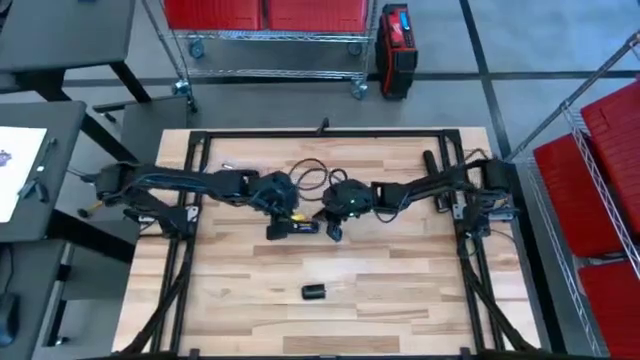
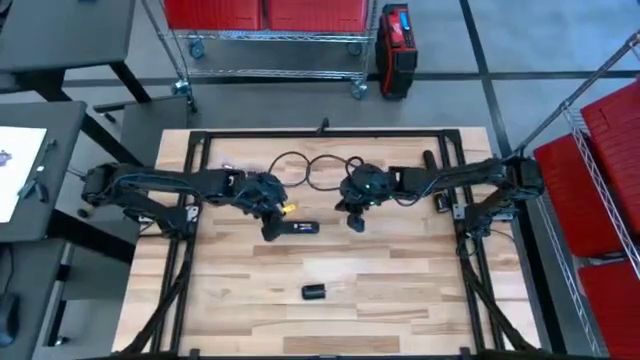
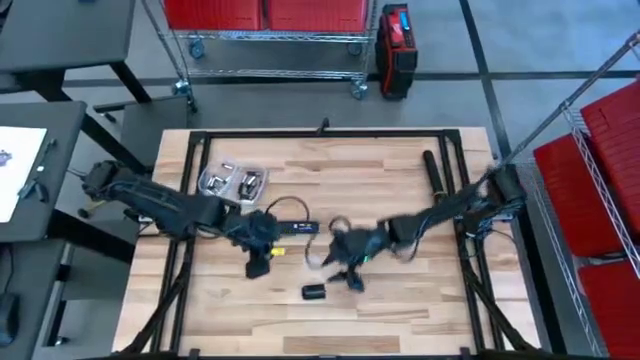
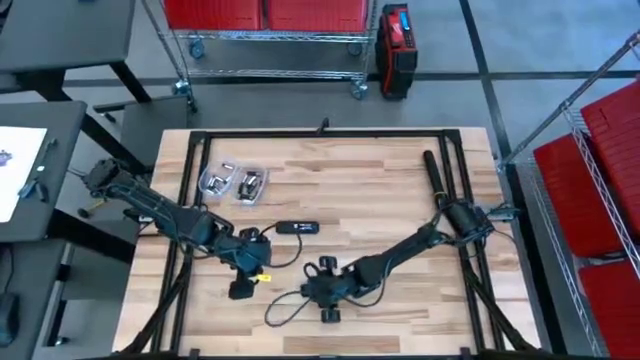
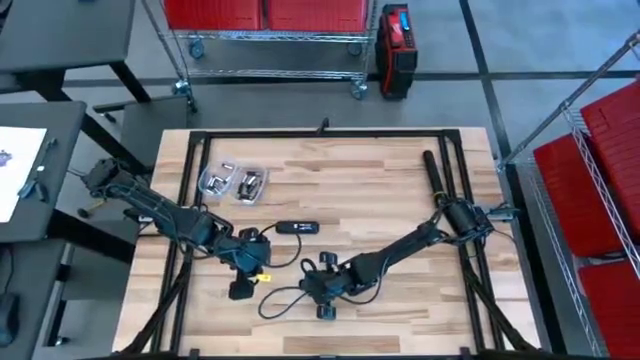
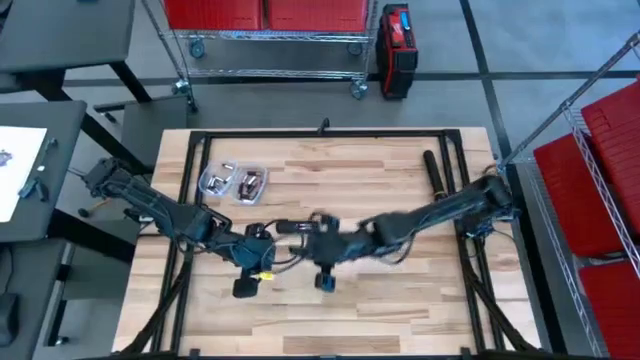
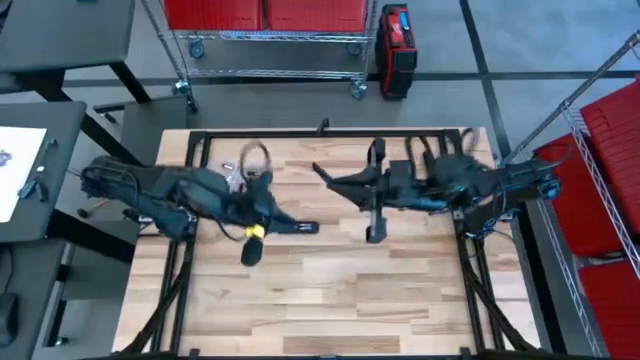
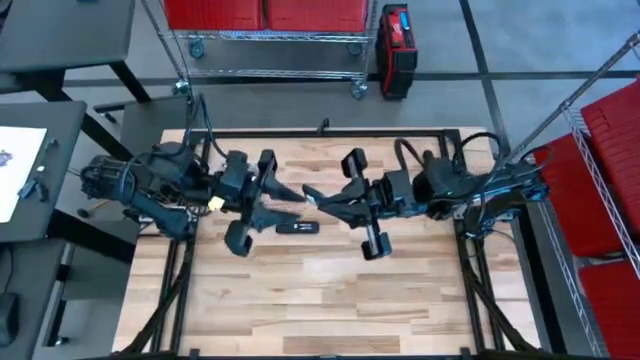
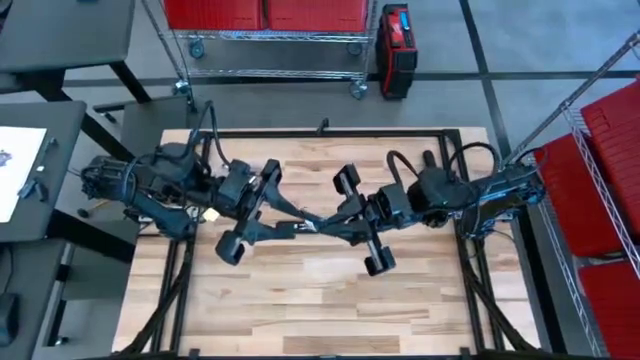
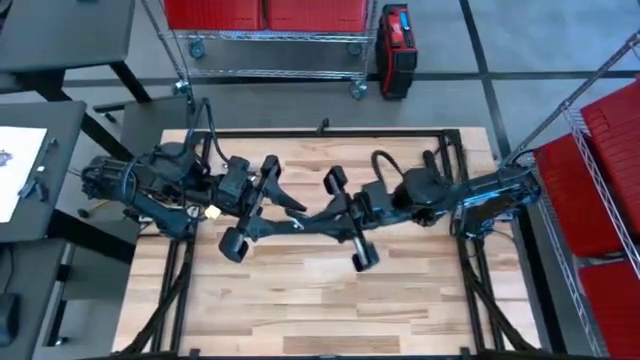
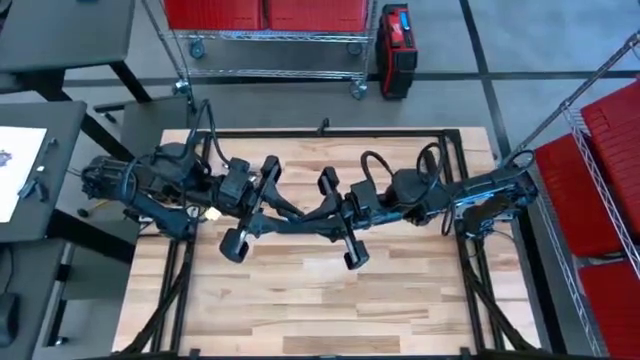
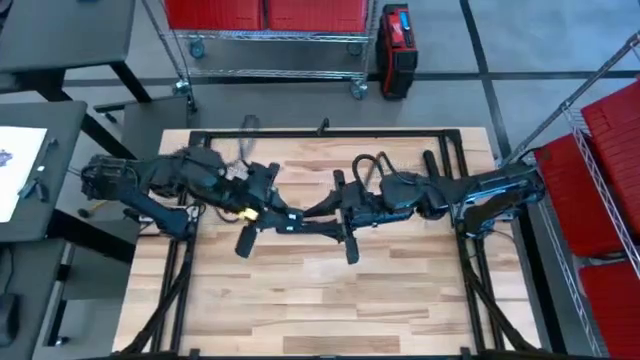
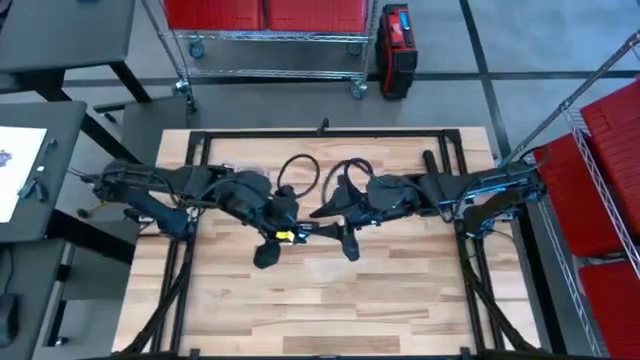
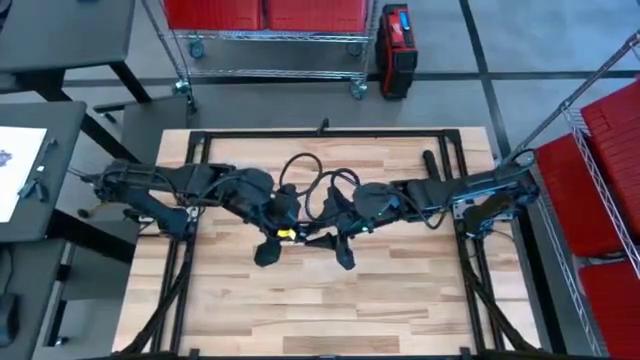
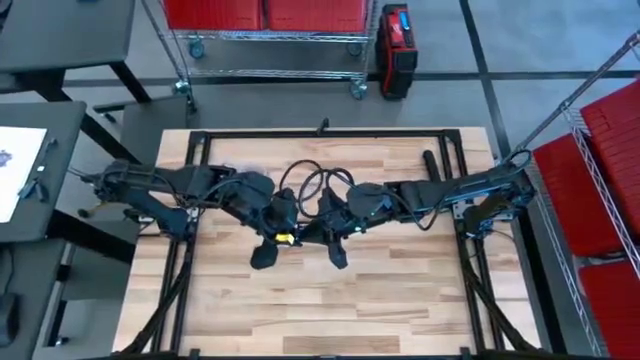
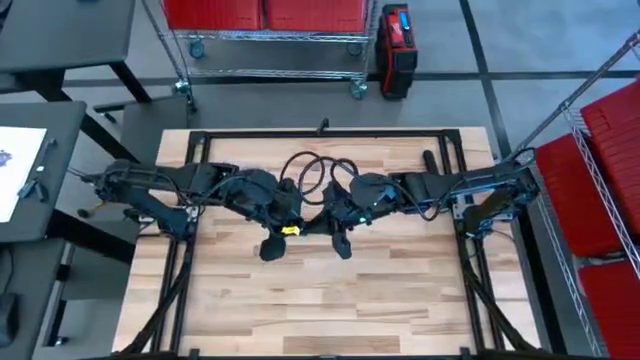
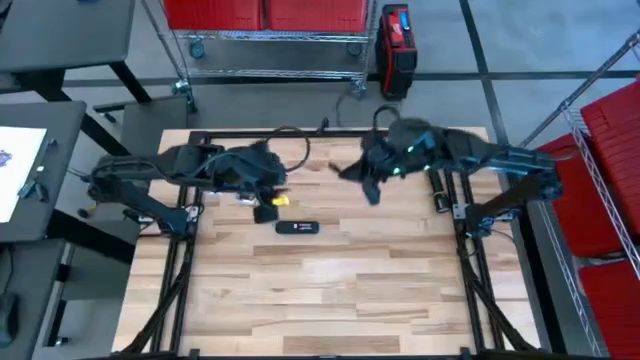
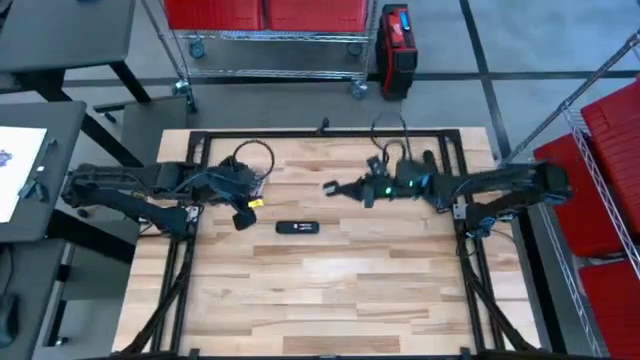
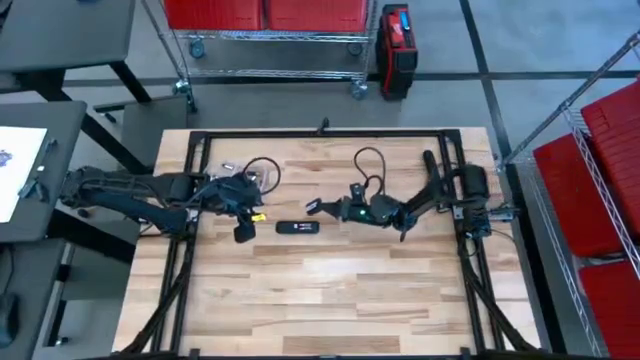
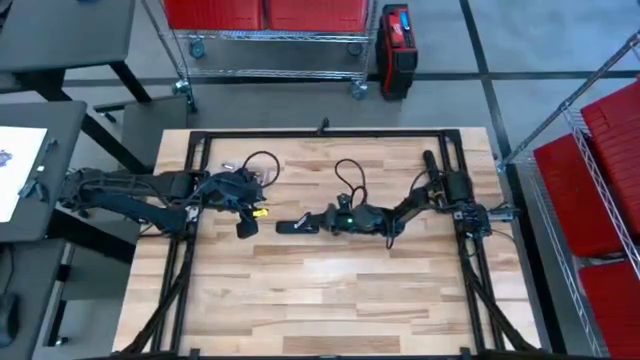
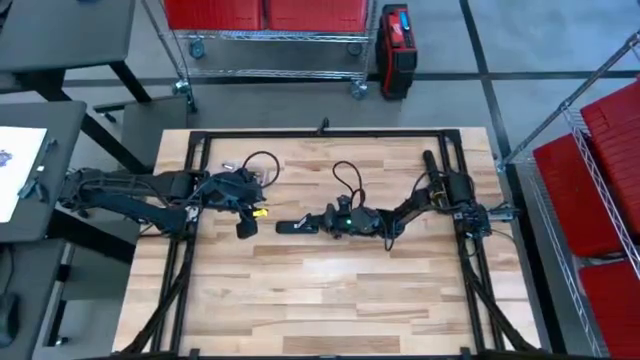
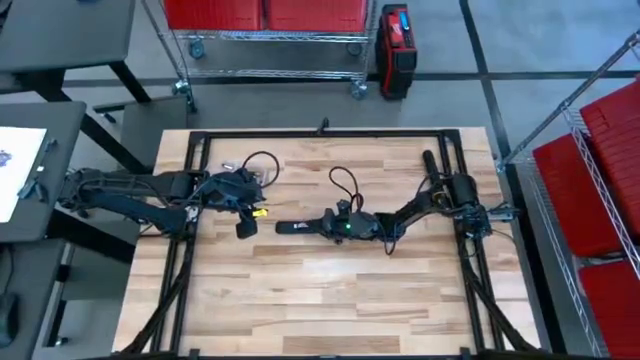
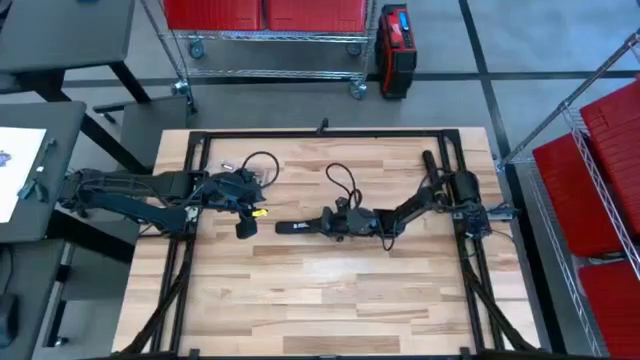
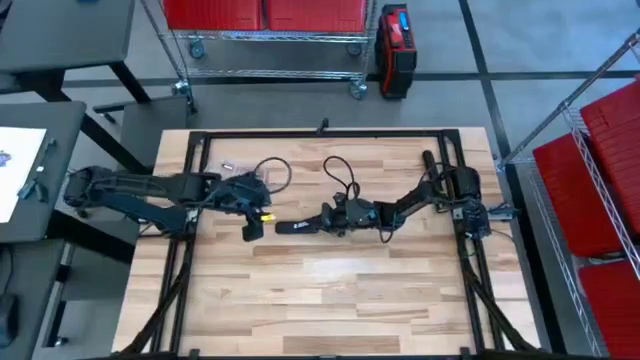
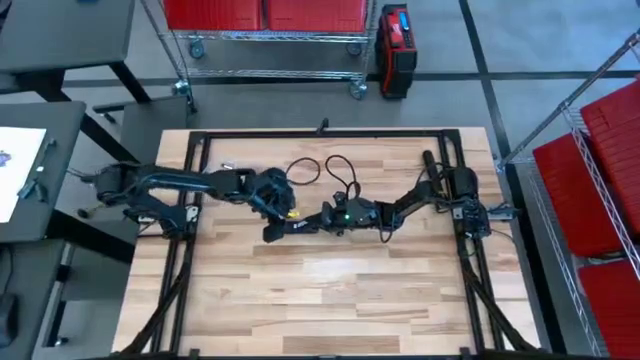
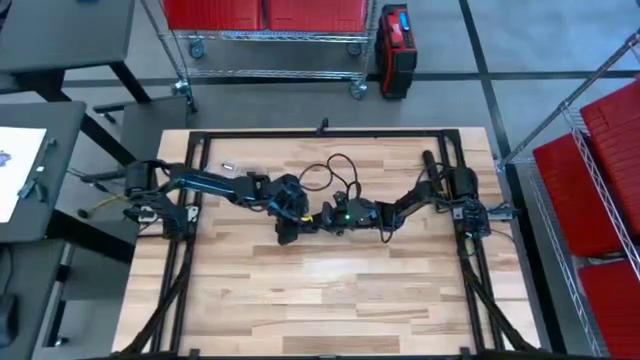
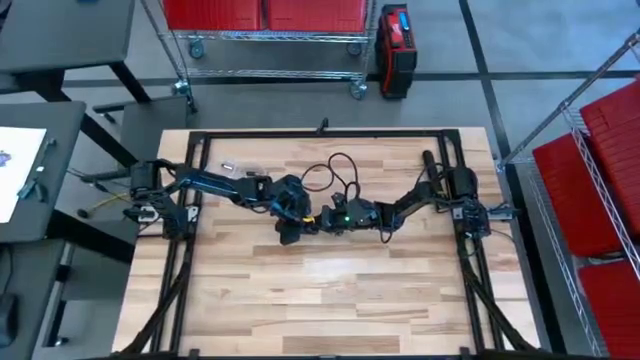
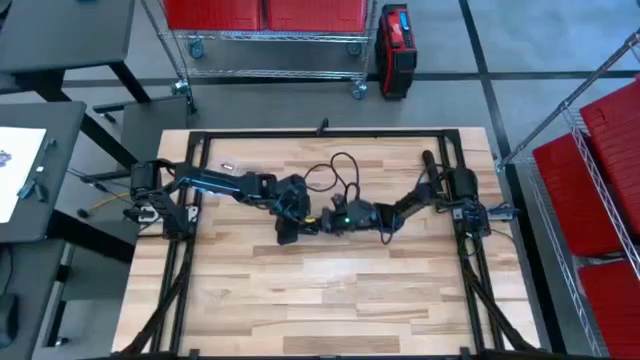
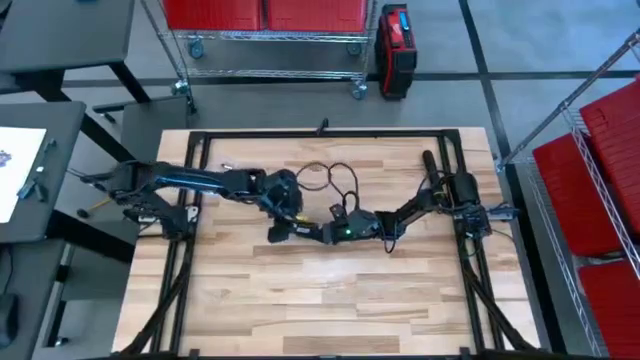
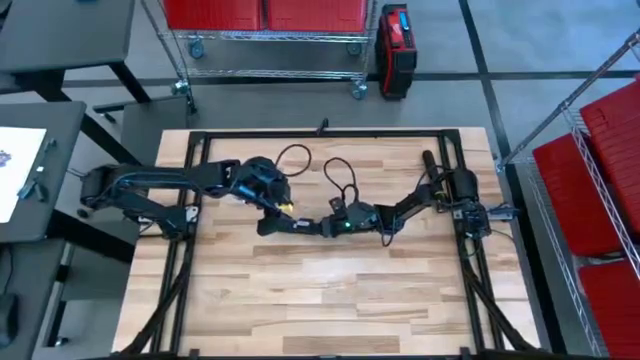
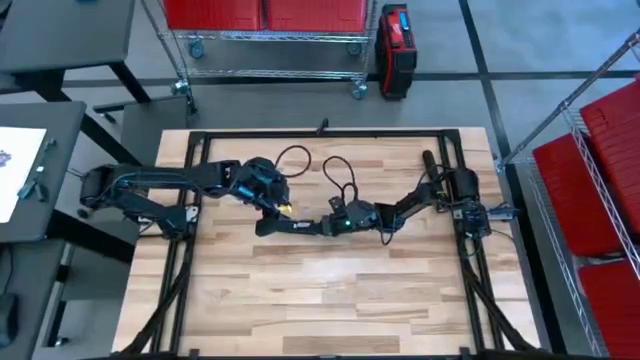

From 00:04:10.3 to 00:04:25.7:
Task: Insert battery
Close the remote's battery compartment

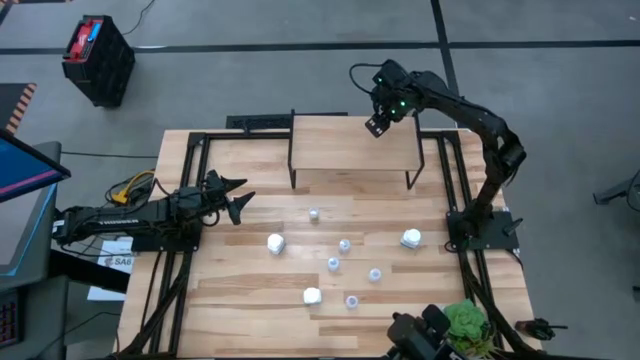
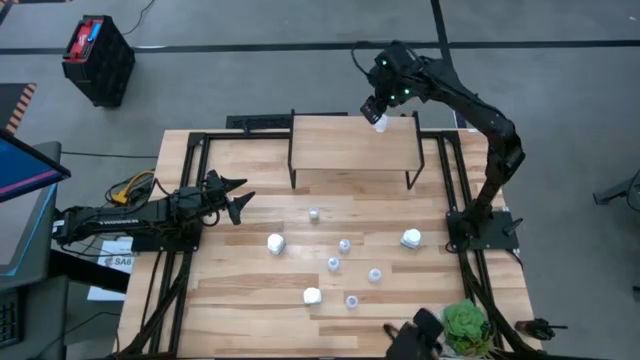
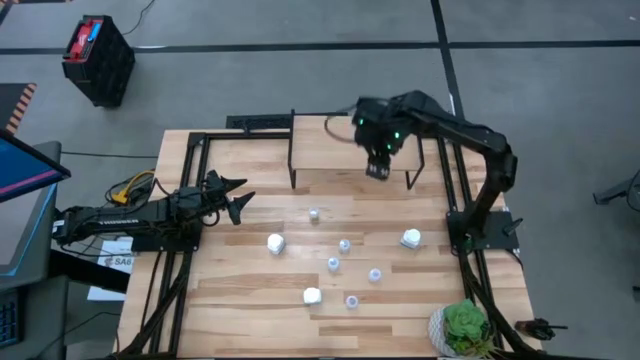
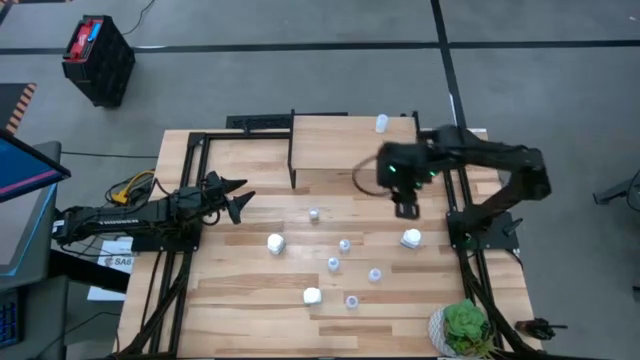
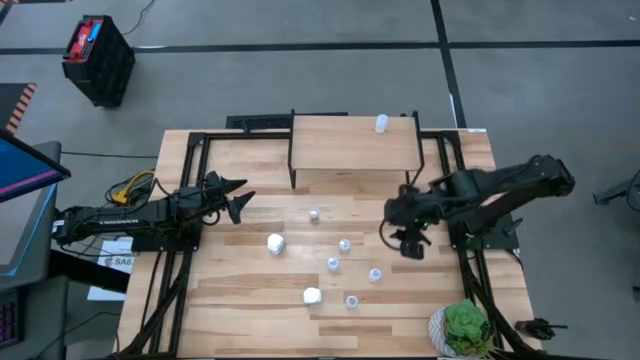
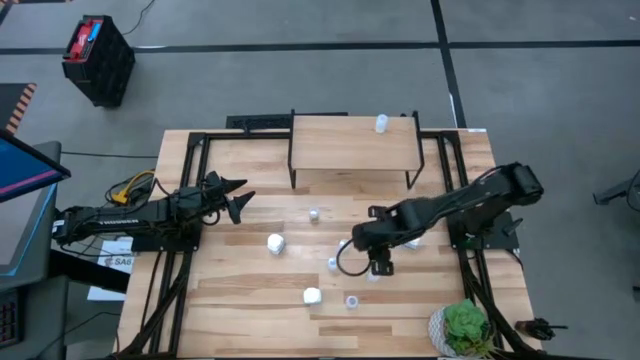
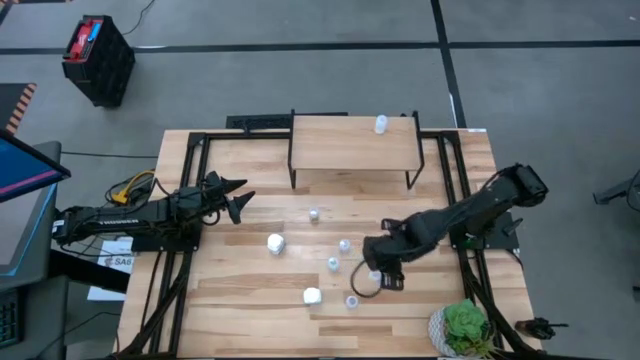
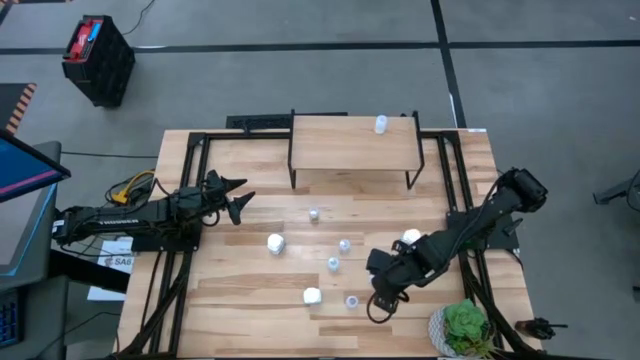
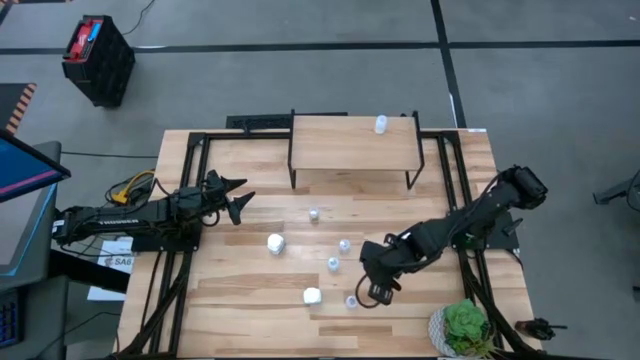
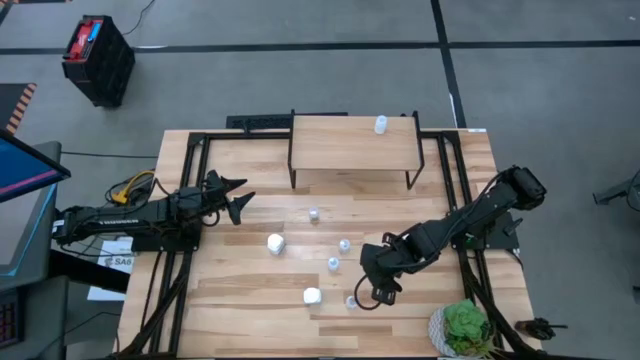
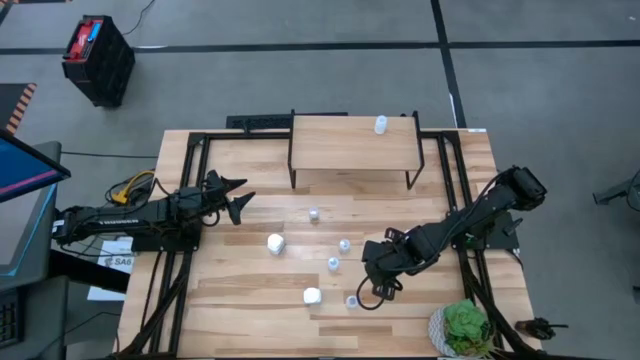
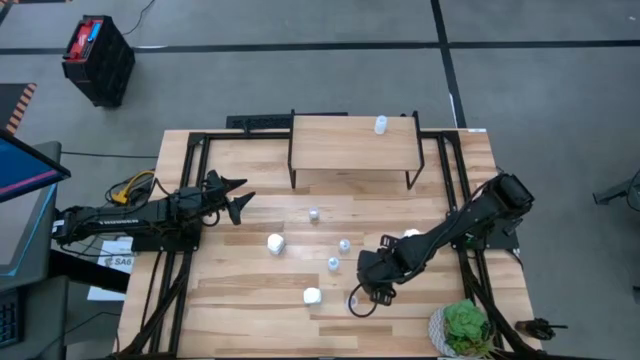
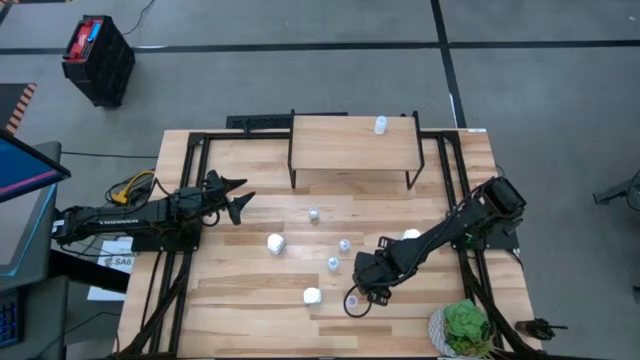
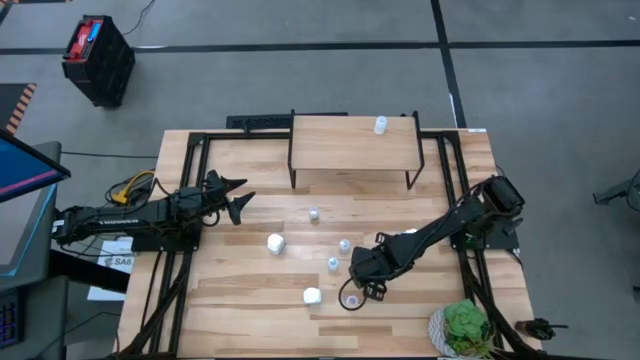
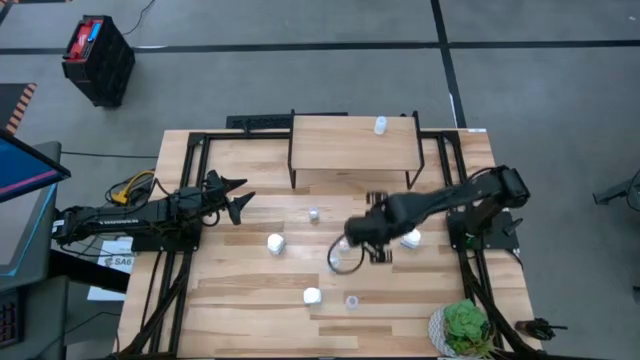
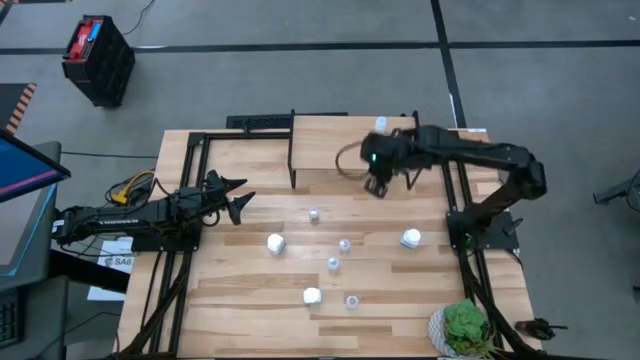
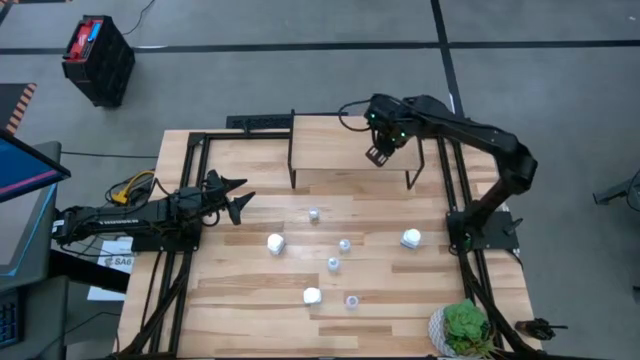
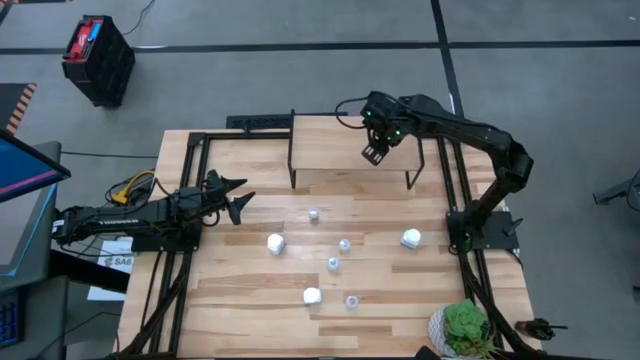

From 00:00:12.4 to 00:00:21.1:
Task: Pick and place medicine bottles onto shelf by color
Put the right white pill bottle on the shelf
